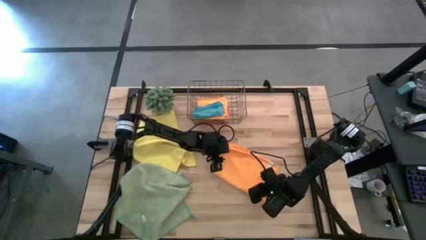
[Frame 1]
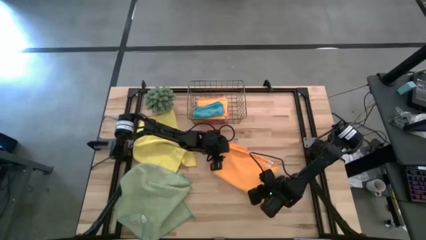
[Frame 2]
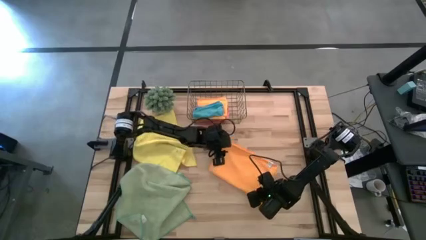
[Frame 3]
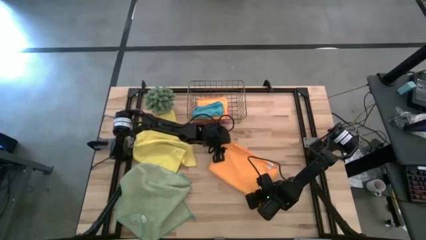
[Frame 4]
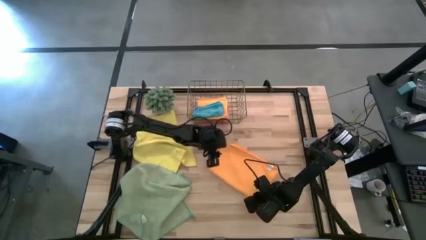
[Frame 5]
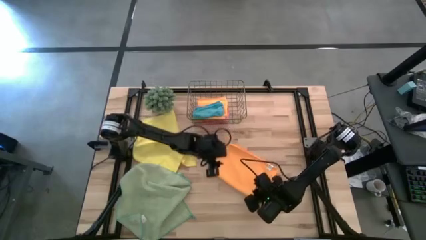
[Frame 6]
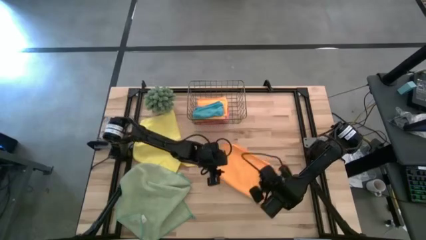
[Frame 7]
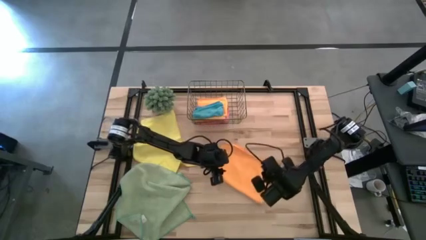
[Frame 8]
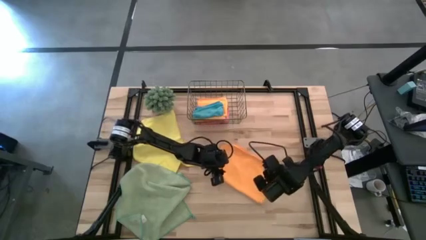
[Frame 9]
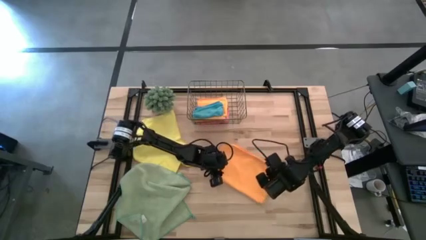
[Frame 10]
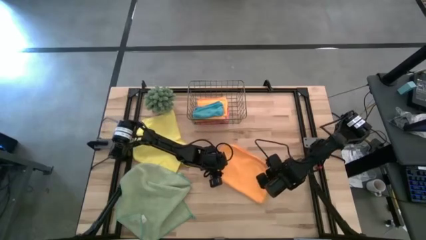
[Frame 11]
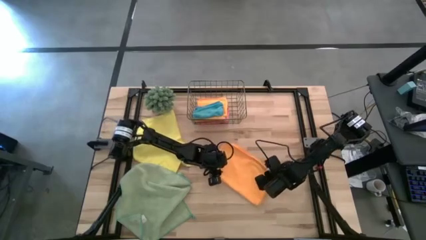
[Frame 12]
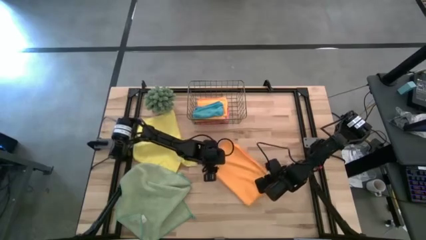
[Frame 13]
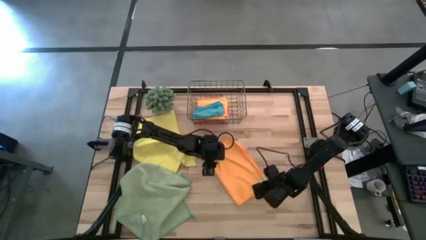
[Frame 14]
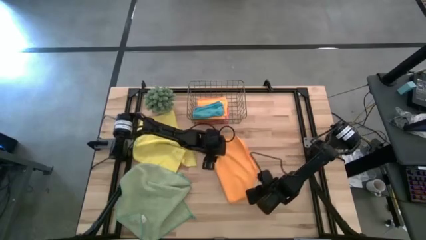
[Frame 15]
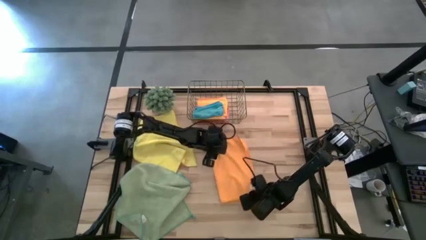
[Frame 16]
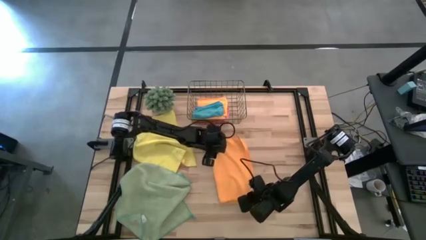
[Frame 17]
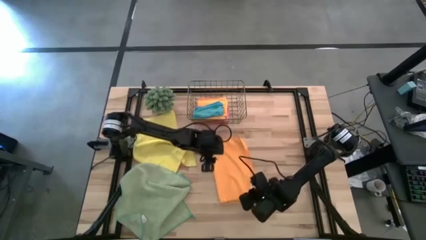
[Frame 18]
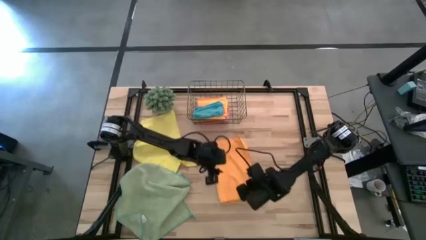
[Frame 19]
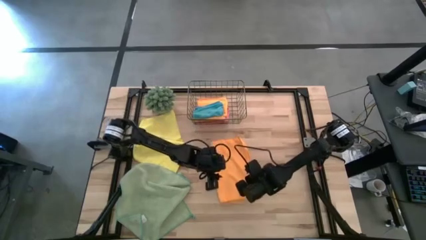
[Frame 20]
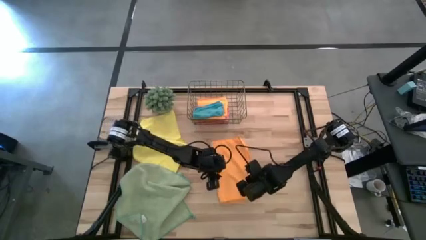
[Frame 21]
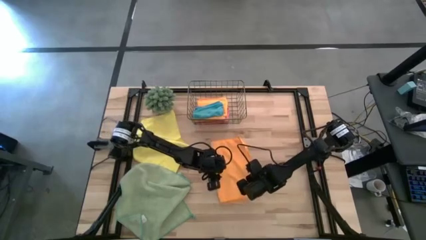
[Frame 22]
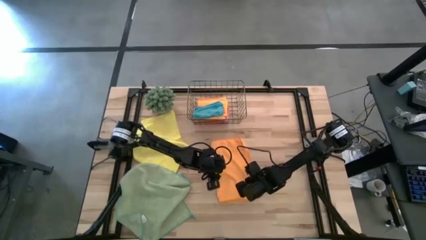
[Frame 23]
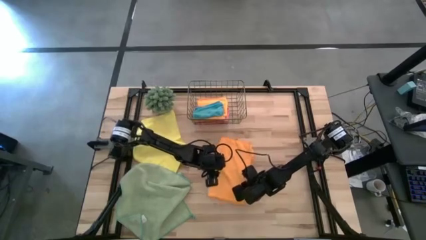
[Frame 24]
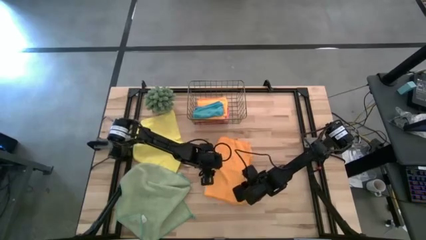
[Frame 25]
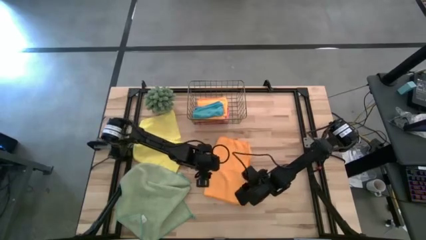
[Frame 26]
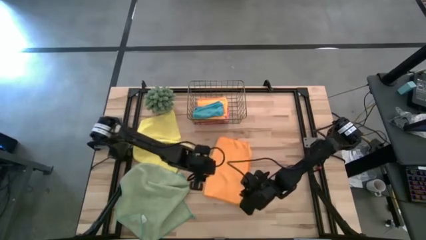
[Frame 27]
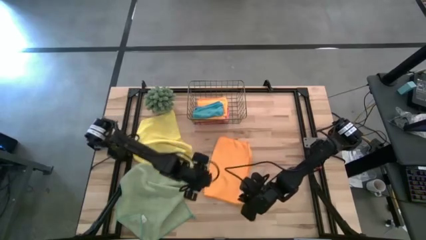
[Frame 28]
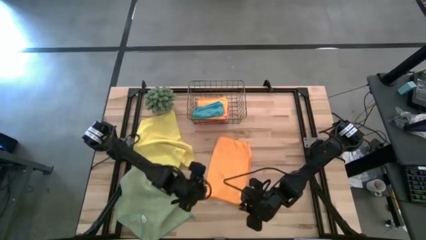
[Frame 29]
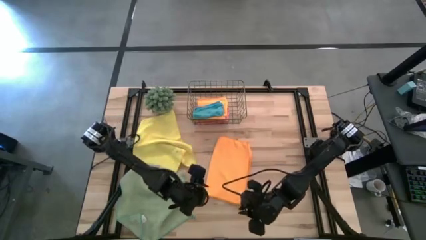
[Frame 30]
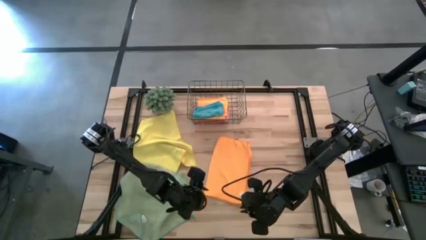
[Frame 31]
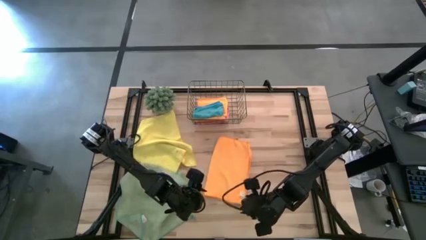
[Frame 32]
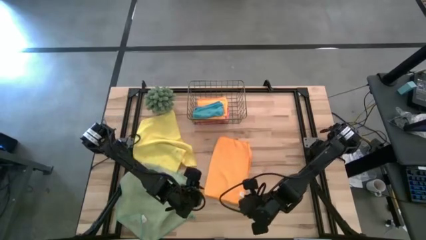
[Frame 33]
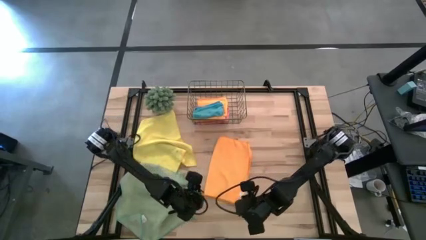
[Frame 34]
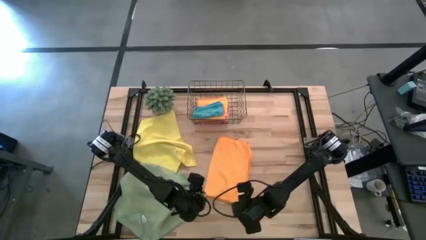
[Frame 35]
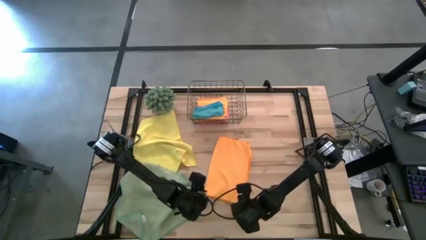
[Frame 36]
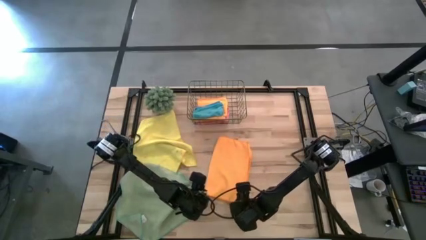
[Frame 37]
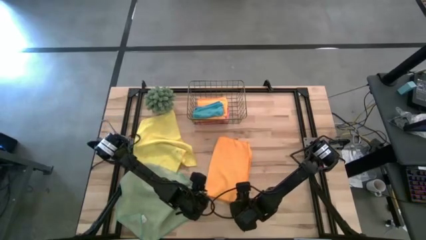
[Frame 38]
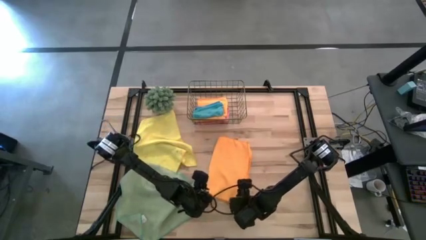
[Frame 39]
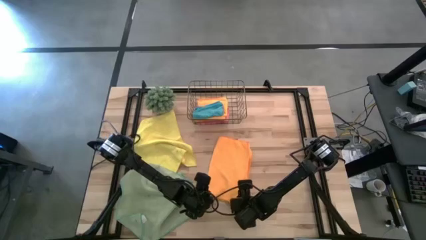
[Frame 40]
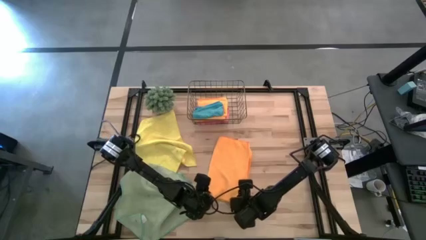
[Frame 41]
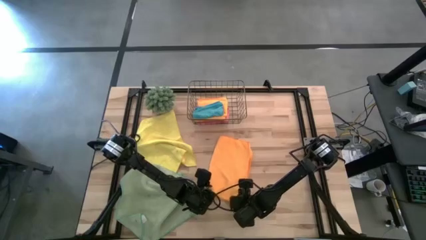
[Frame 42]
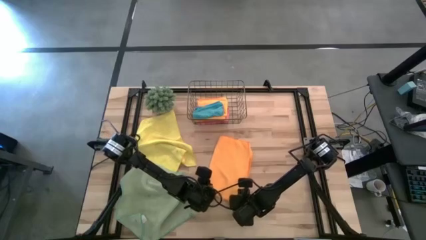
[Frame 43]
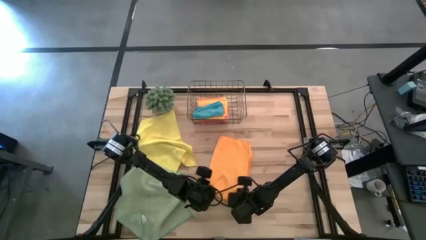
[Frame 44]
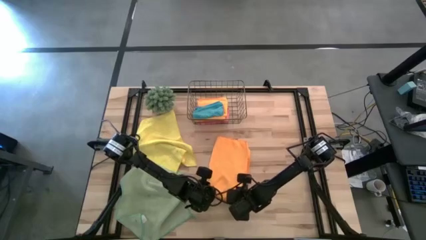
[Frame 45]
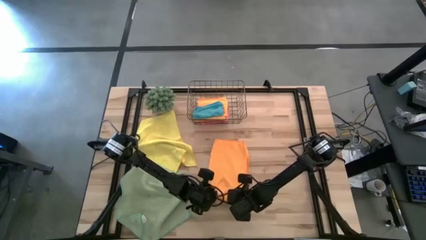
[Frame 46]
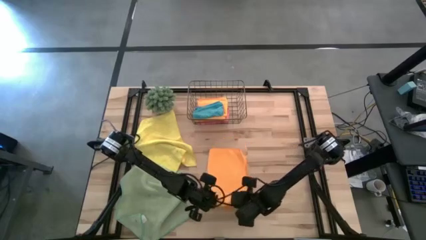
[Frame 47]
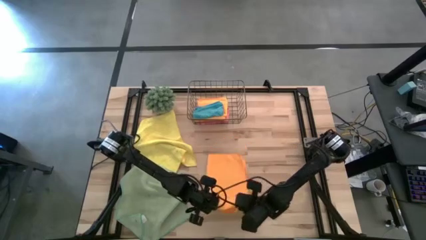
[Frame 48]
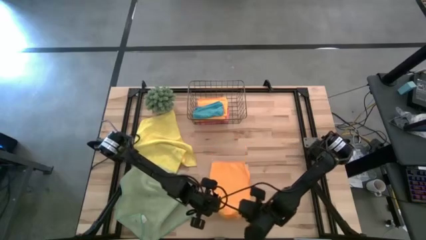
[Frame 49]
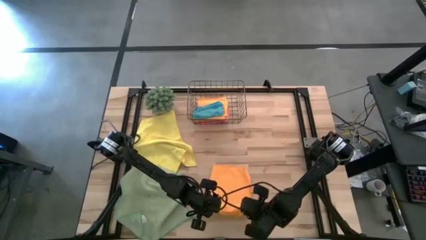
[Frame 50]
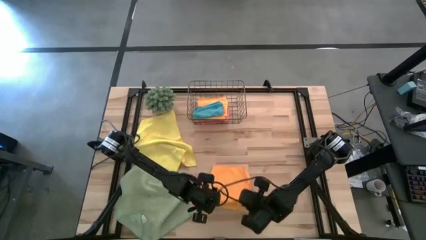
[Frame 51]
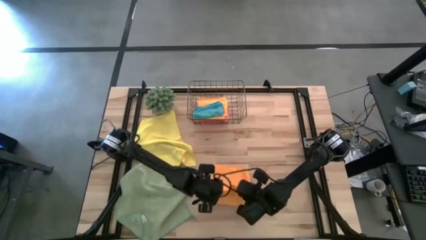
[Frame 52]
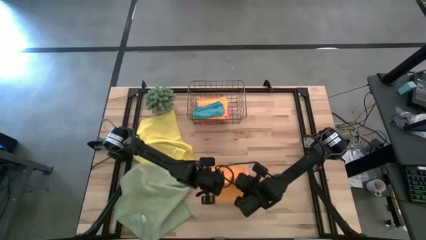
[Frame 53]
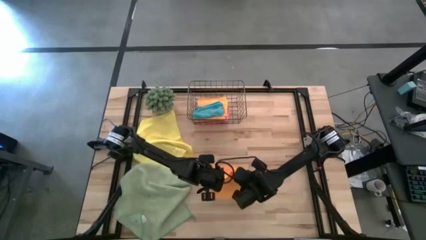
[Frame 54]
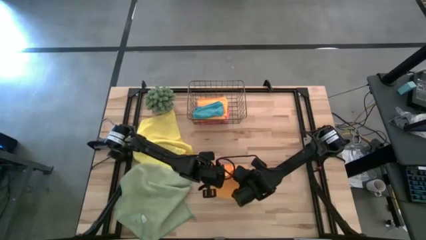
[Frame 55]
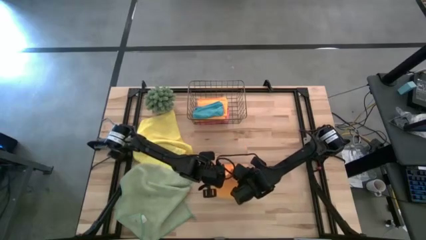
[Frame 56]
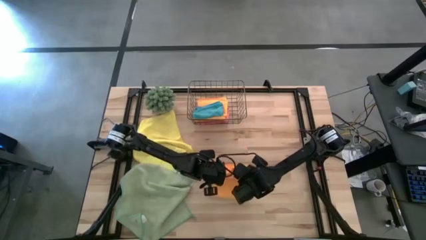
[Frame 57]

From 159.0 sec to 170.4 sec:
Task: Fold microfiber towels
Fold the orange microfiber towel

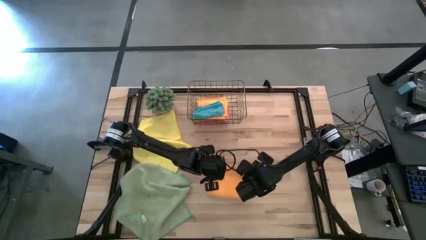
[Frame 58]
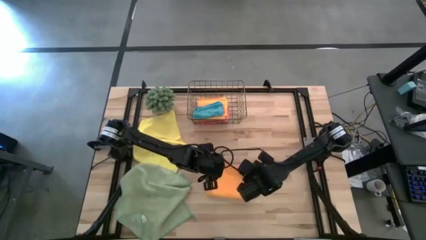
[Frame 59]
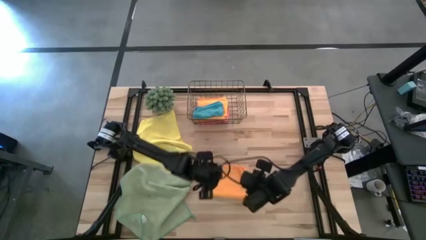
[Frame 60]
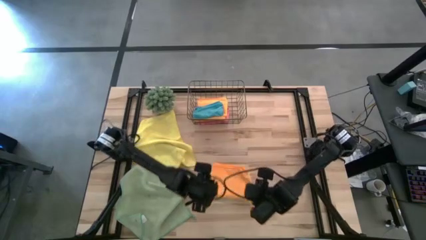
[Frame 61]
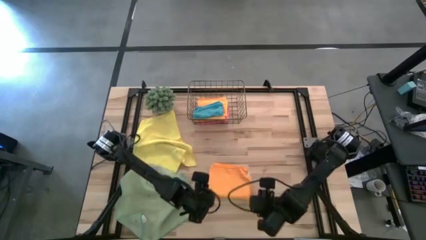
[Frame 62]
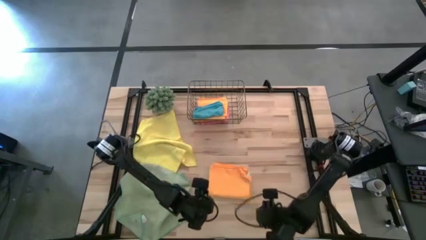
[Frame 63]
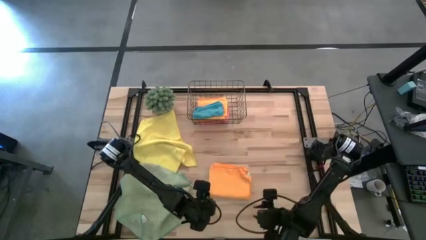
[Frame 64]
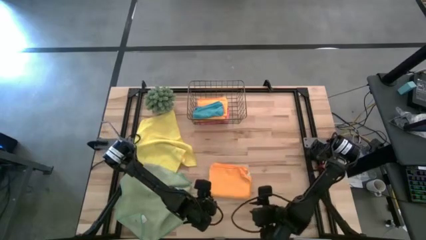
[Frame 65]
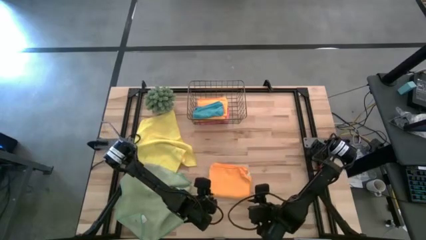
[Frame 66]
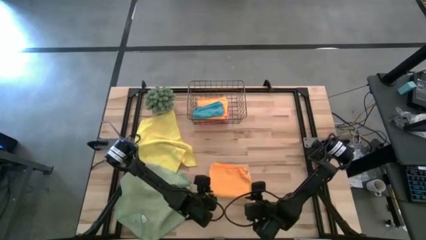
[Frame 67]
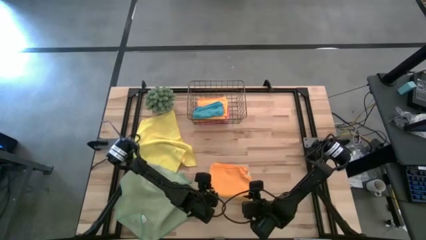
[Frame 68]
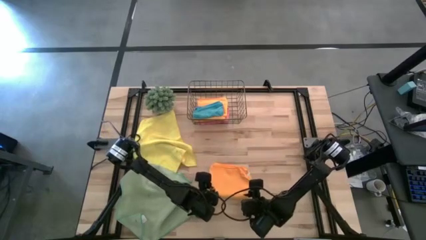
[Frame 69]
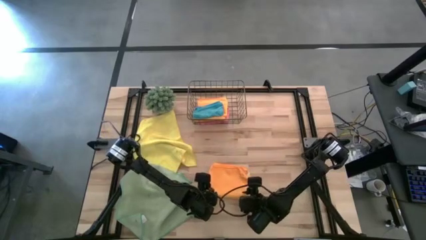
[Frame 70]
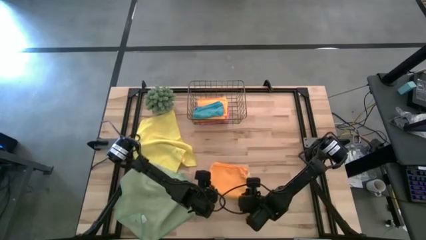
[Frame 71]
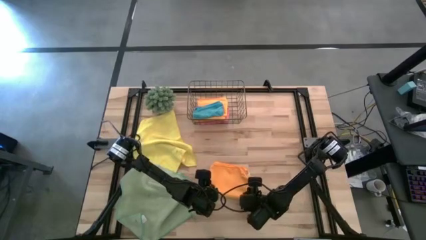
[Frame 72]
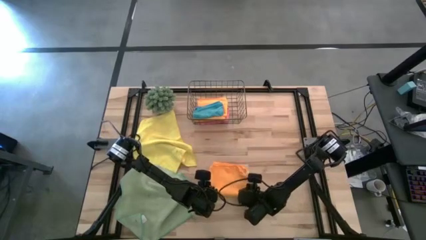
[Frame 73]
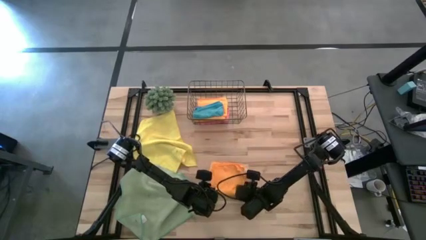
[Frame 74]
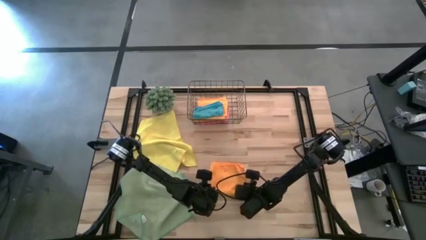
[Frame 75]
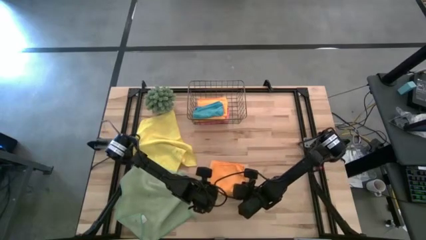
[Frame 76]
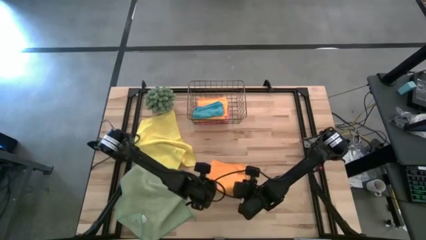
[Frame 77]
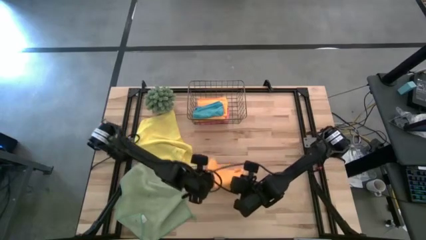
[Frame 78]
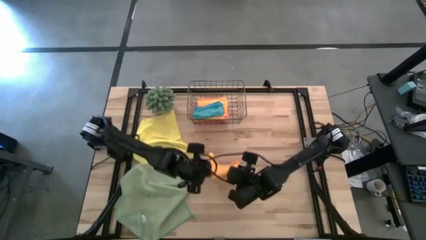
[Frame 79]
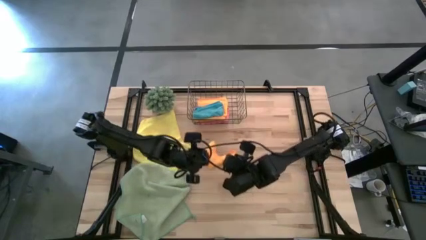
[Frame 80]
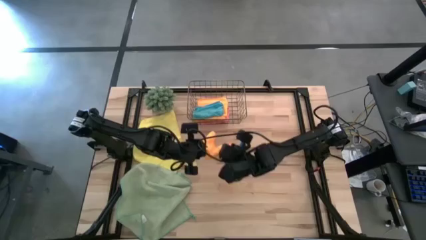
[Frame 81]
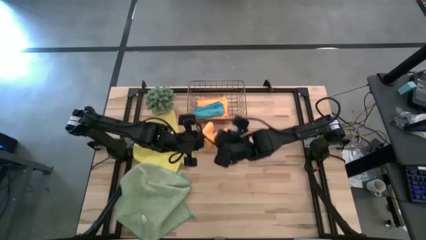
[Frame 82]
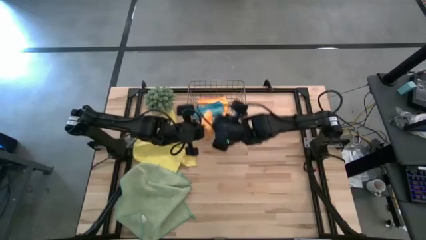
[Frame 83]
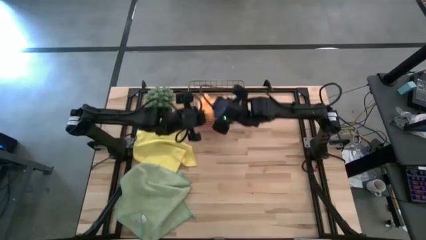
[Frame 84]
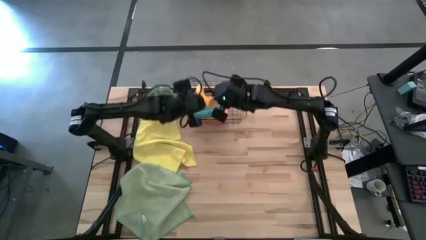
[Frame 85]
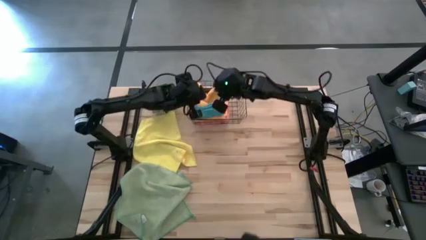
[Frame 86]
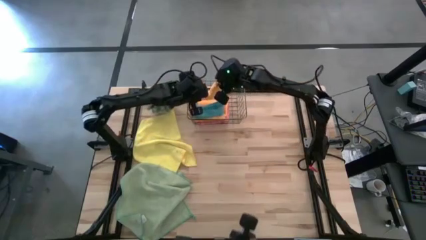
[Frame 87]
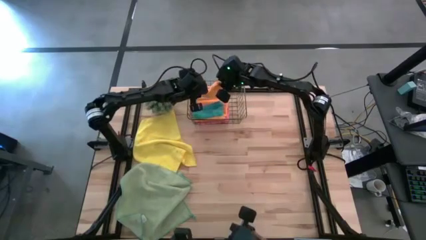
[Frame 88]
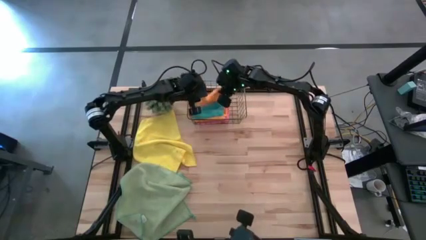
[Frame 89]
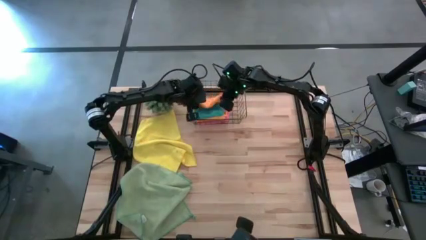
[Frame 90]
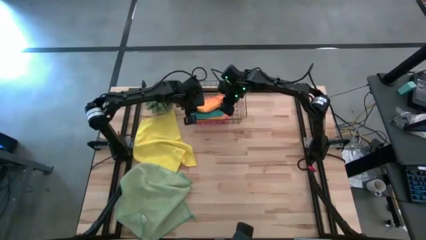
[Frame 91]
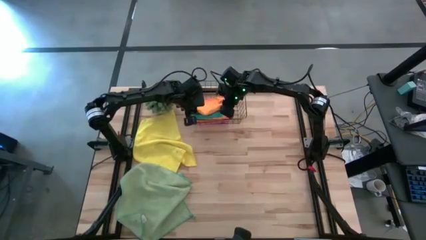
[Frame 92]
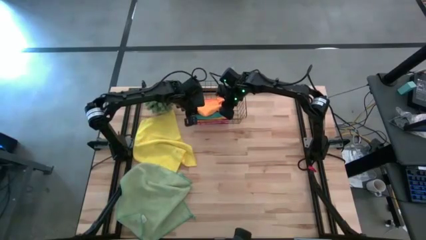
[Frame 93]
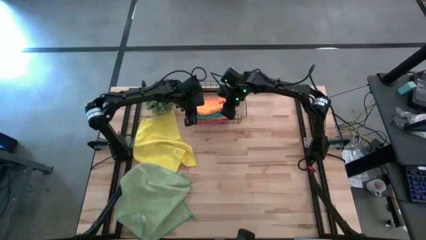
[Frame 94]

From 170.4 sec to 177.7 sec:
Put the folded orange microfiber towel into the wire basket
